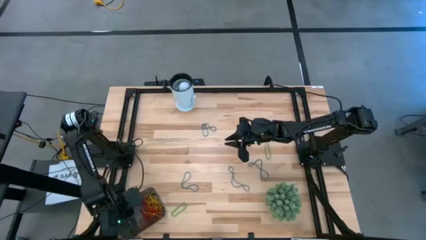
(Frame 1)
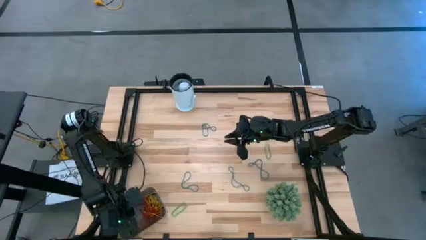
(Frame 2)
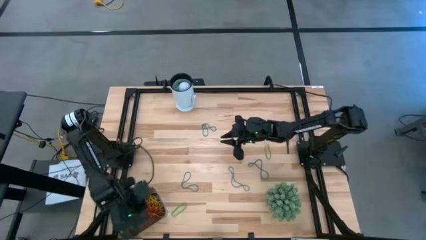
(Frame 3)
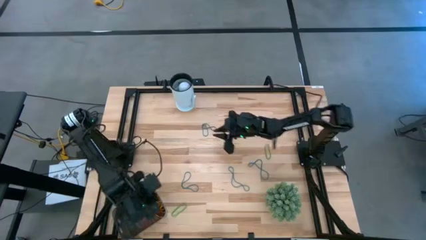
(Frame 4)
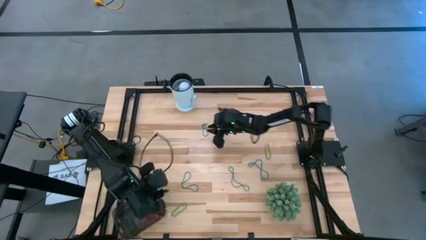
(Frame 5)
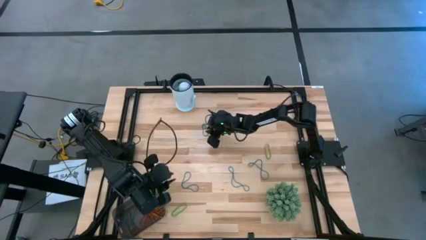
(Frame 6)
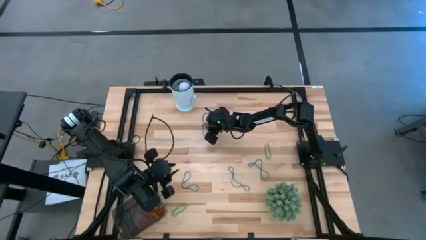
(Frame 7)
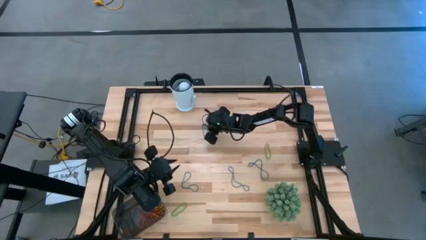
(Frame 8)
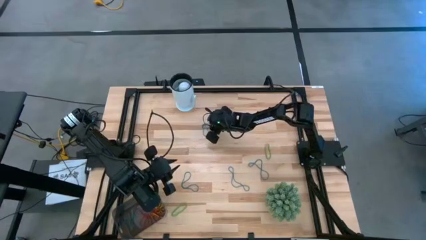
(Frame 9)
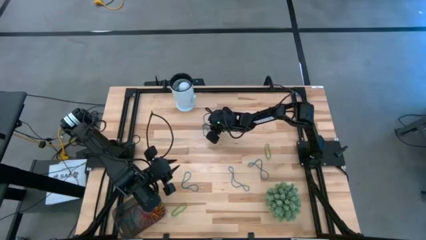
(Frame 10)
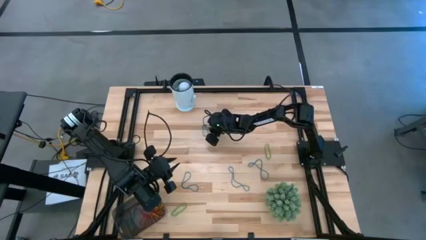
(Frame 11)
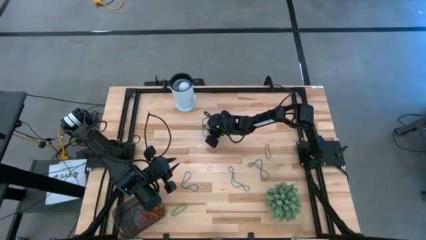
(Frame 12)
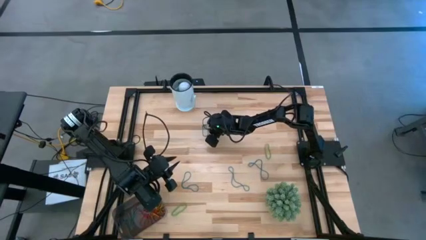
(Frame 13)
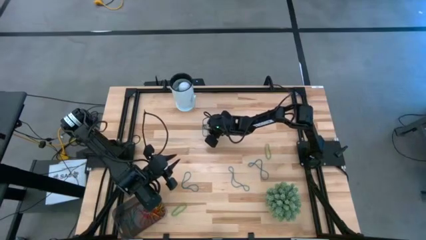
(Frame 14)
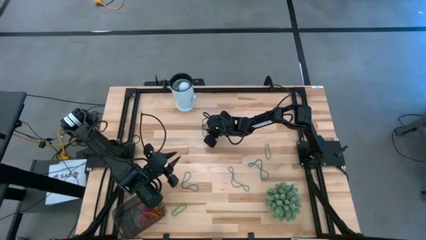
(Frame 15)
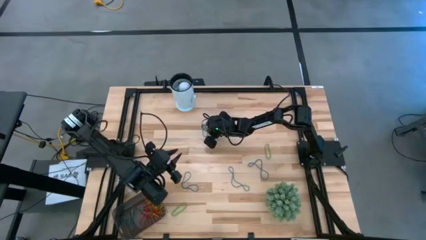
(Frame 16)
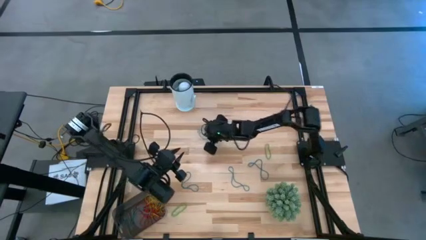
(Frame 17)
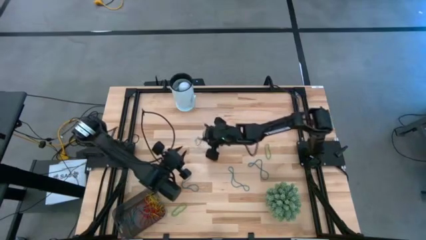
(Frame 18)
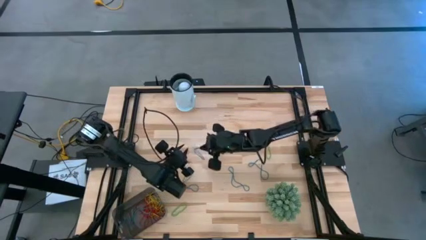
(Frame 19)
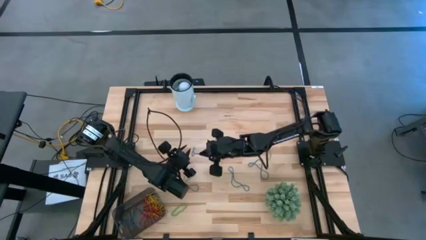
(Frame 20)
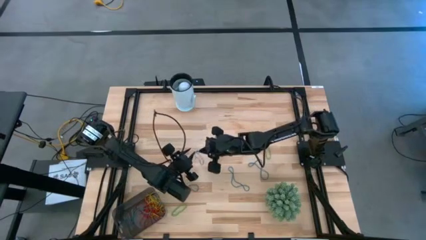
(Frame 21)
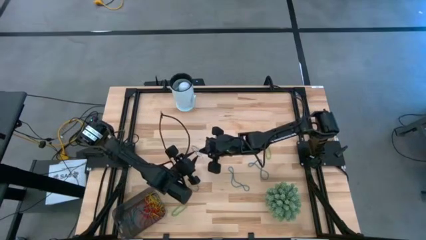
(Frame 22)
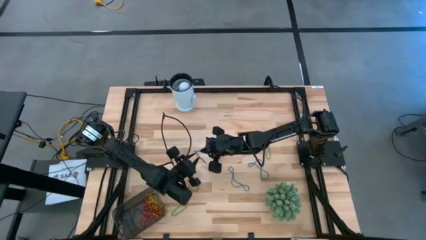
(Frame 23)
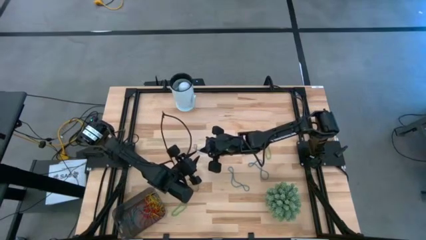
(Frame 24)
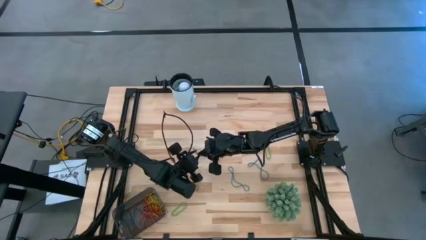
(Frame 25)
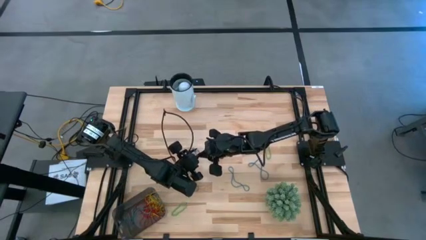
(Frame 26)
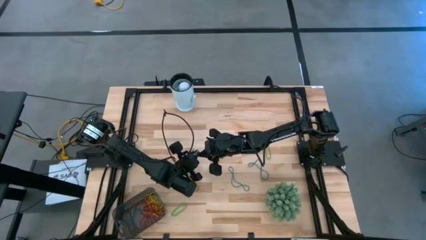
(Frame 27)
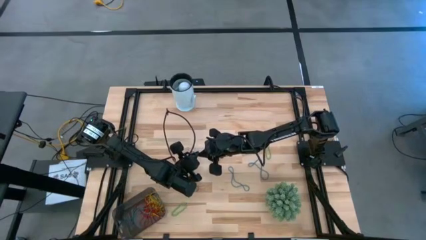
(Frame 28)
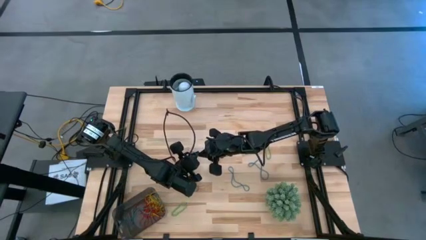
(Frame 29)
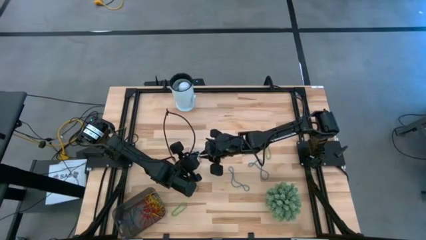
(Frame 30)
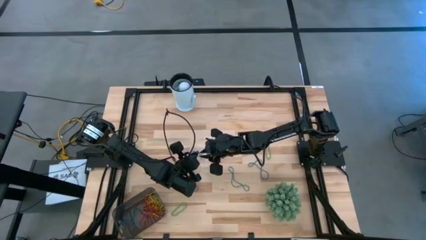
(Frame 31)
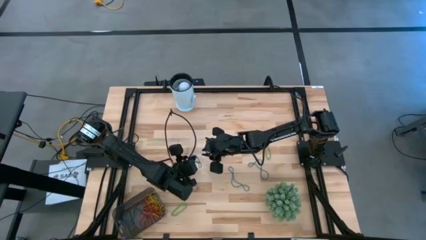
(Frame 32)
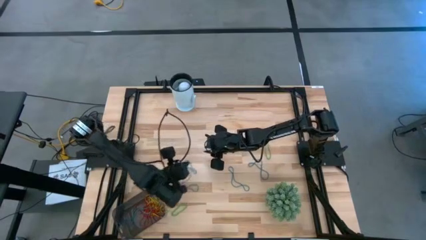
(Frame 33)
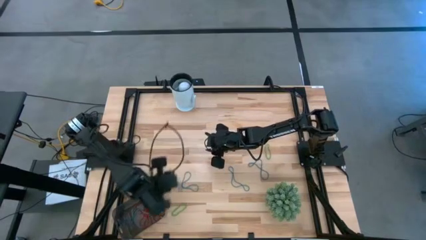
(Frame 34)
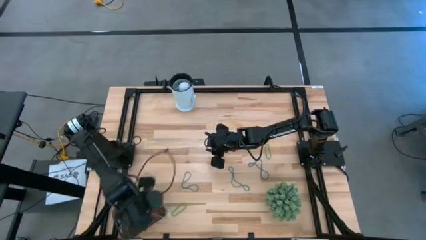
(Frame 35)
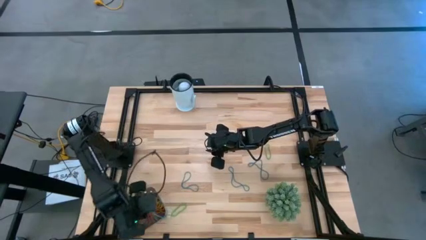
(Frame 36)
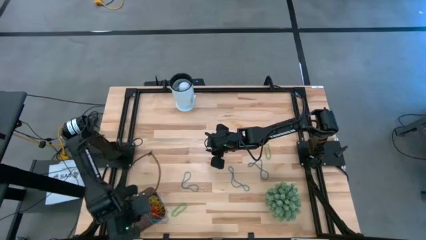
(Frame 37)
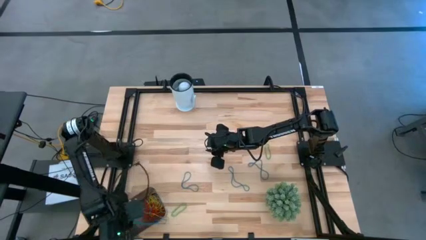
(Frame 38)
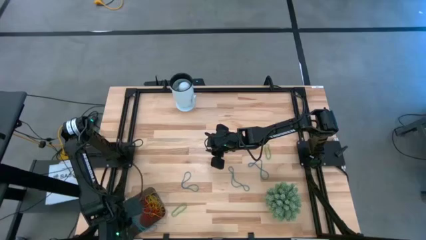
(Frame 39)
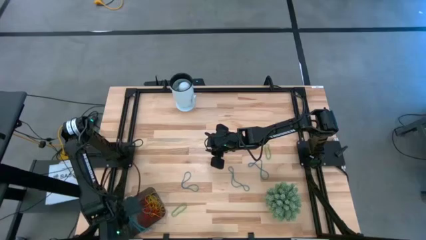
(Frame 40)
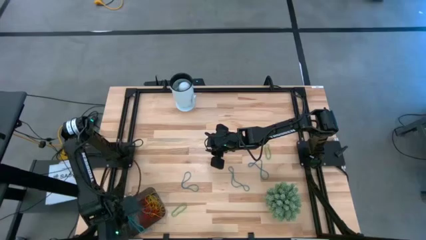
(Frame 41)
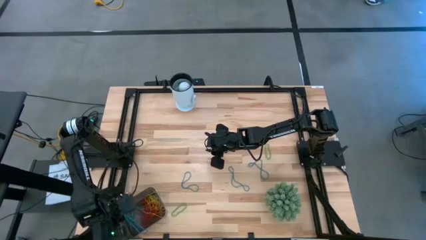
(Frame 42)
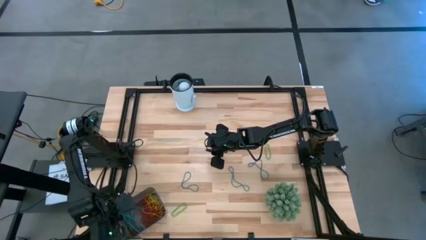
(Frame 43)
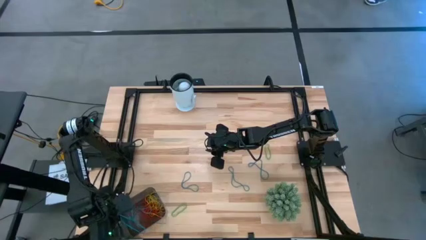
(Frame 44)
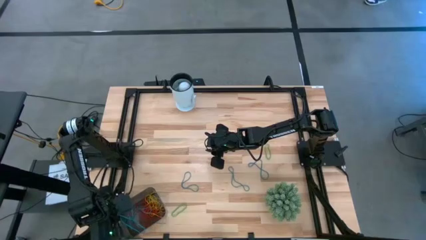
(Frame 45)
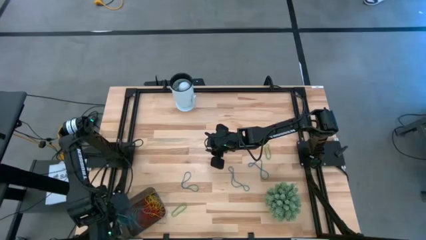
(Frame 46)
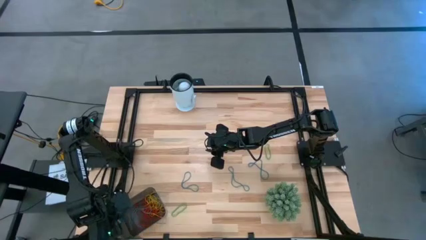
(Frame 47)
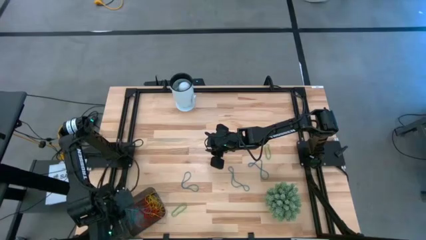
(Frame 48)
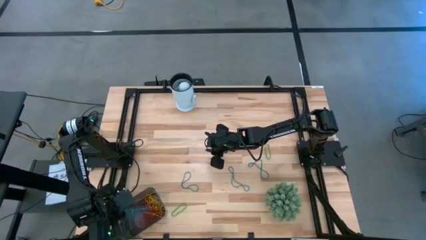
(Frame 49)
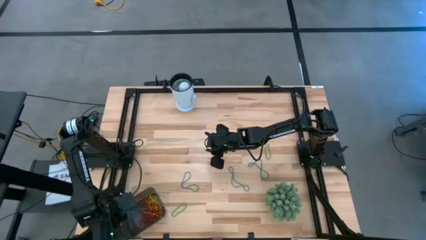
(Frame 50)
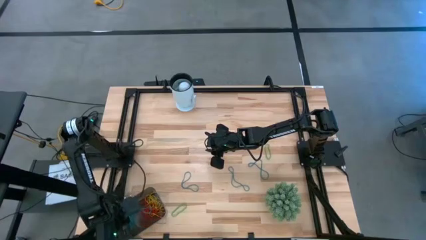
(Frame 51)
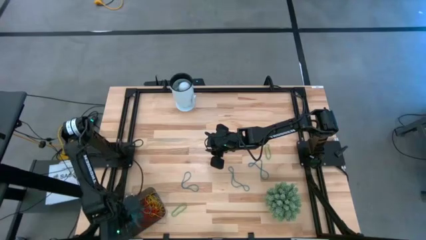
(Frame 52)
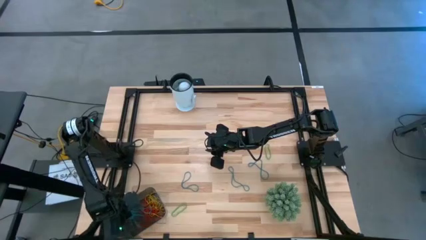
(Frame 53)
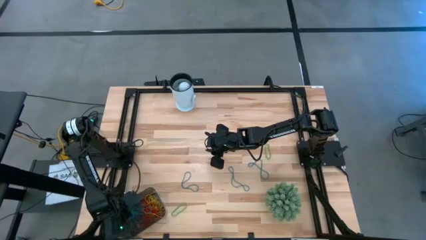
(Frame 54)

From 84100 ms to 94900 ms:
Task: Pick and place items into bin
Put the blue rubber band into the black bin

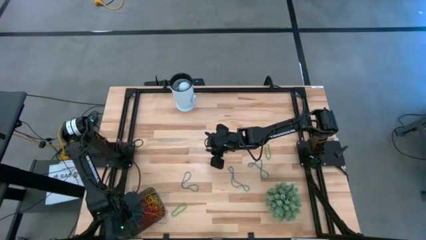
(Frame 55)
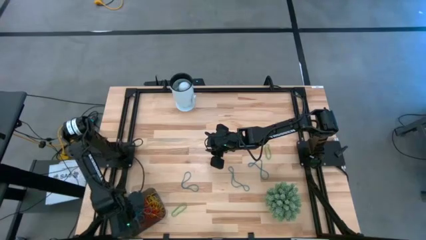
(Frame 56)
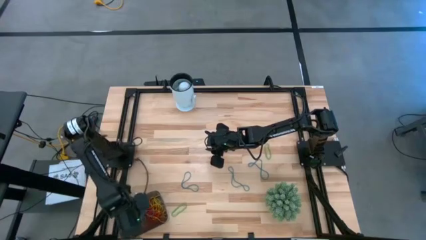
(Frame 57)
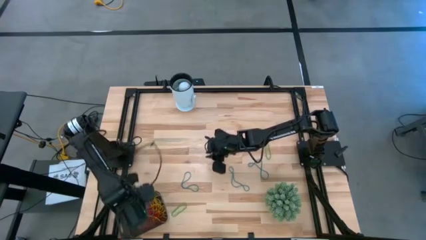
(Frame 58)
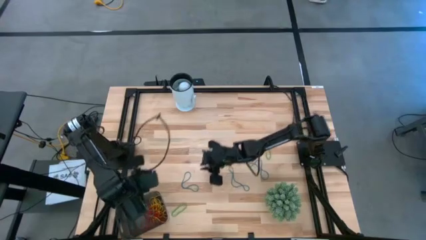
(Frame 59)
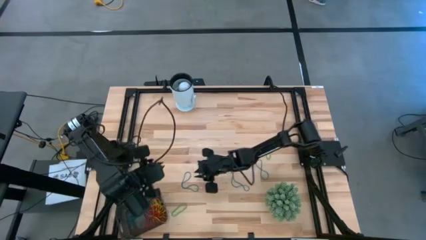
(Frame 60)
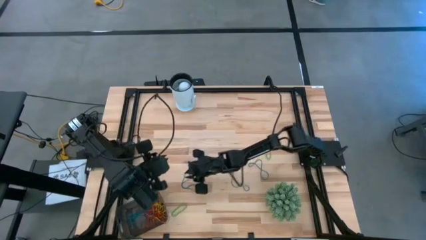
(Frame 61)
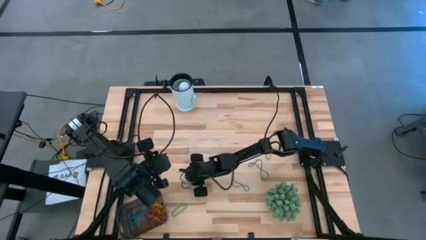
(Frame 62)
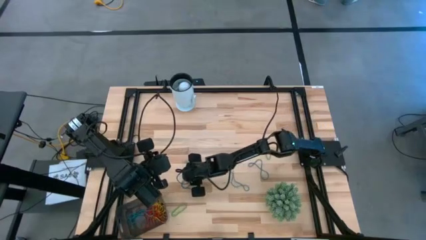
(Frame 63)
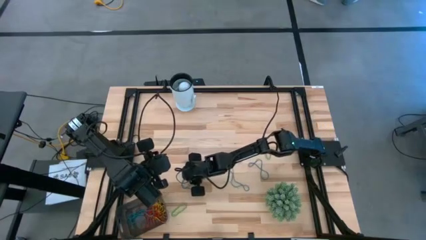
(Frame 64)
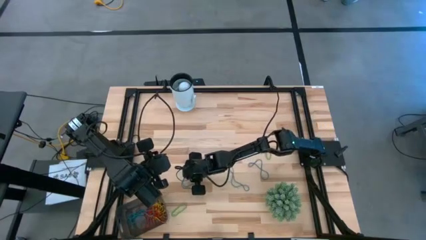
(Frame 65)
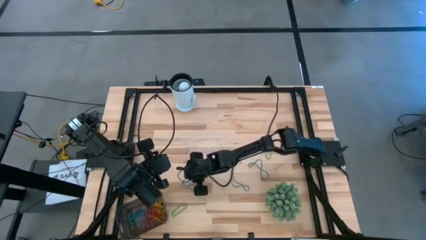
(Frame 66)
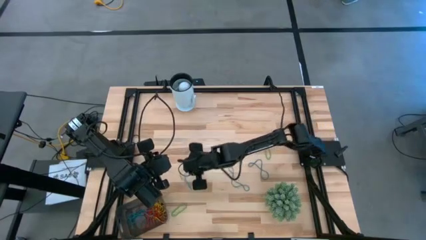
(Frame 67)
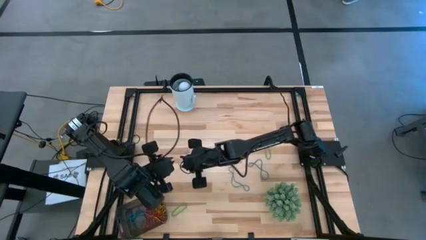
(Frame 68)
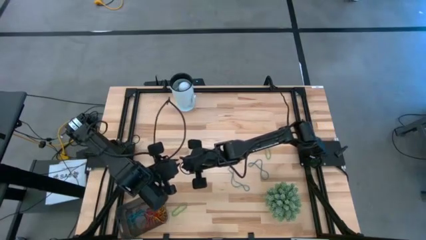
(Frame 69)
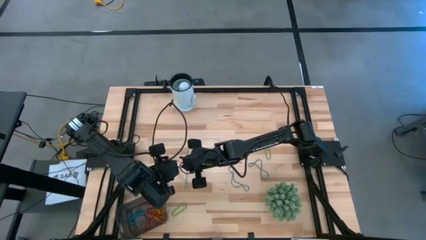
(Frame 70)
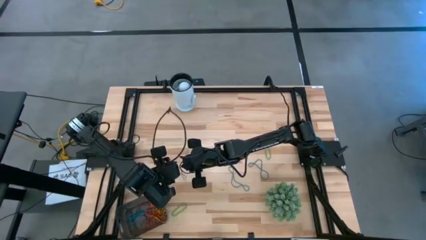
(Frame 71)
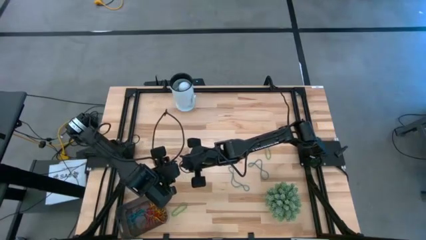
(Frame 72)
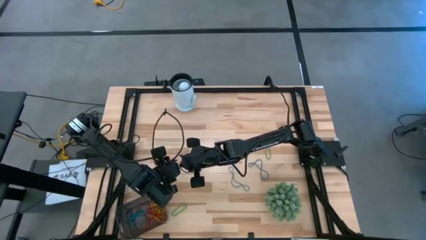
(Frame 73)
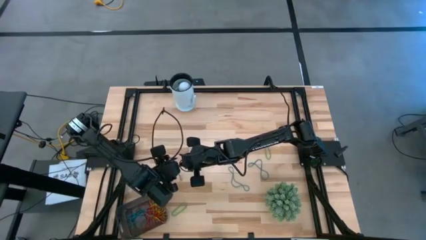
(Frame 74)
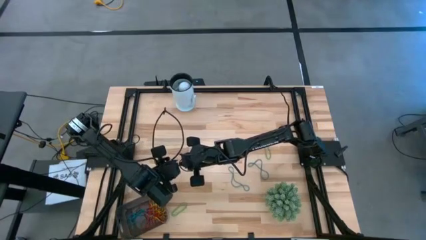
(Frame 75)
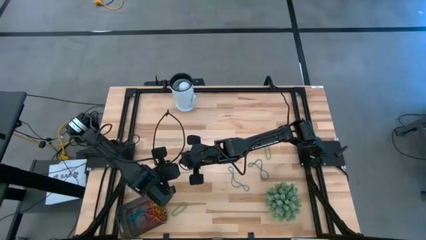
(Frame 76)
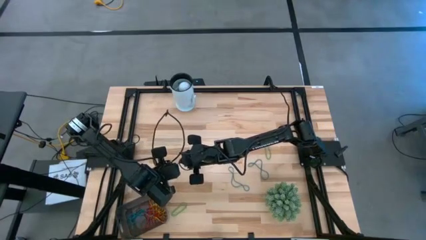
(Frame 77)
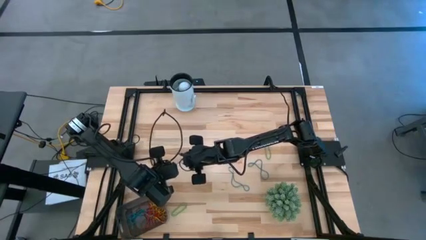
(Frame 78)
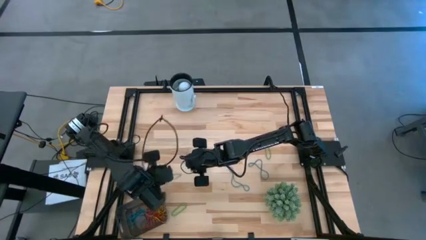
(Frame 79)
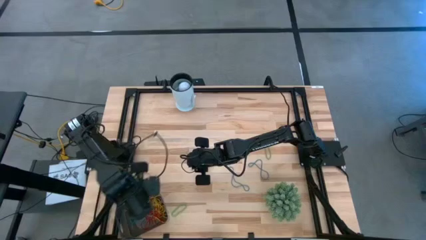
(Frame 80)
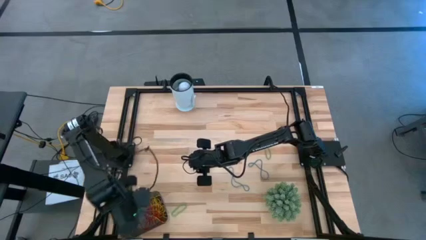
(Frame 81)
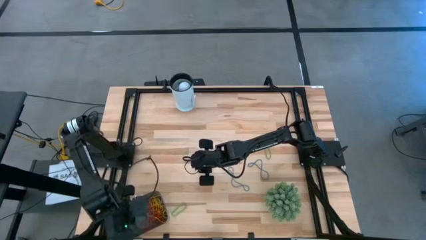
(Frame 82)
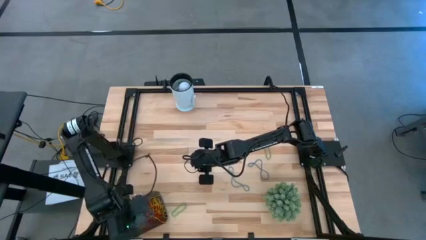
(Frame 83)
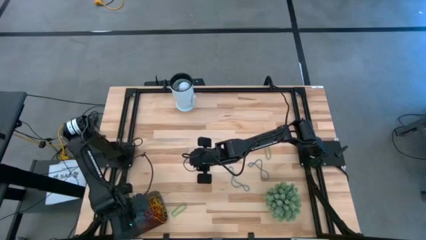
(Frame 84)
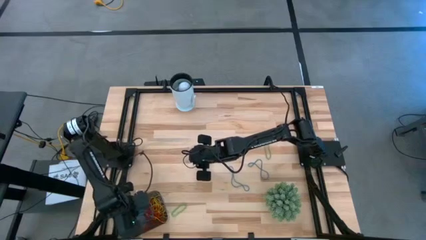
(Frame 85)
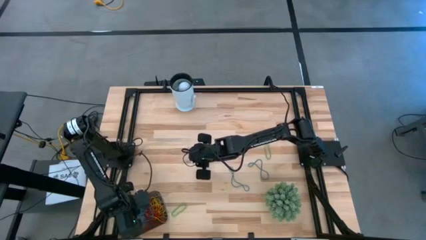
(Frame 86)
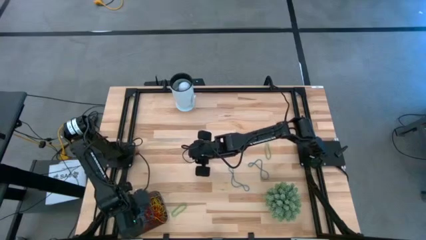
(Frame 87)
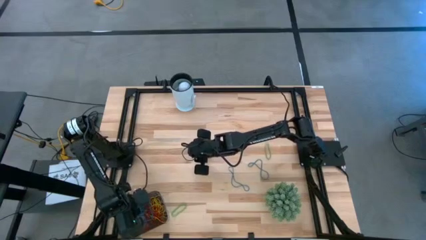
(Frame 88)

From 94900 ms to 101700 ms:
Put the blue rubber band into the black bin
